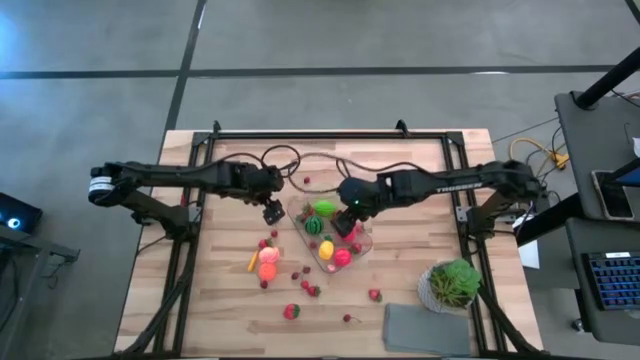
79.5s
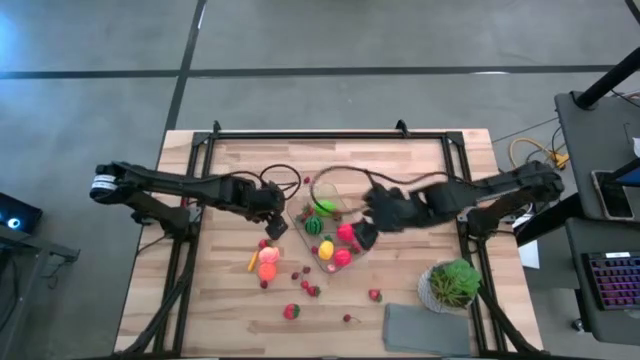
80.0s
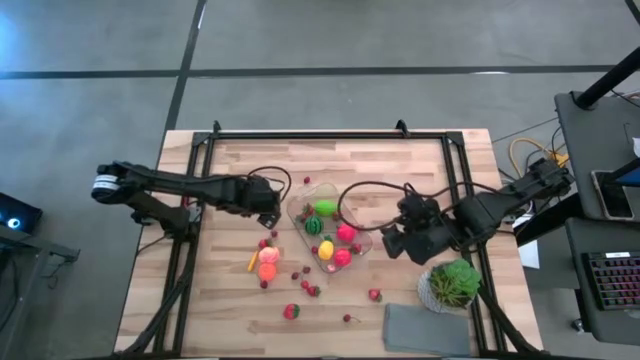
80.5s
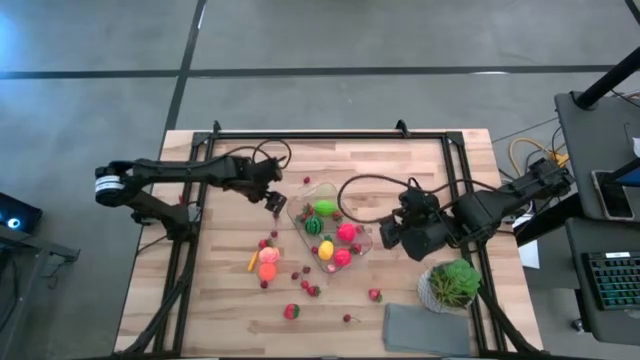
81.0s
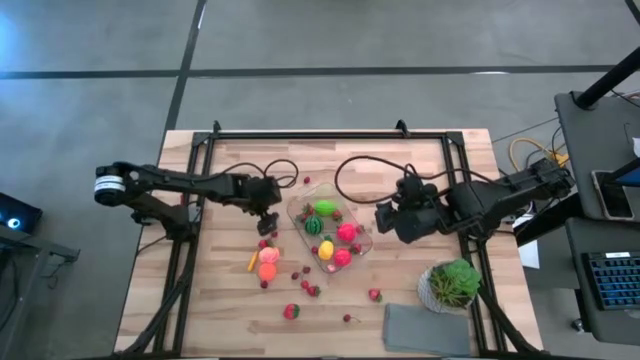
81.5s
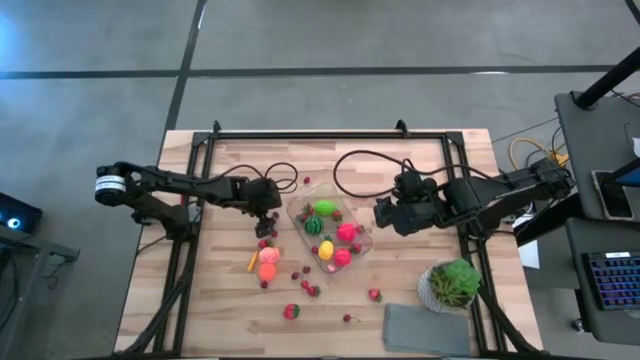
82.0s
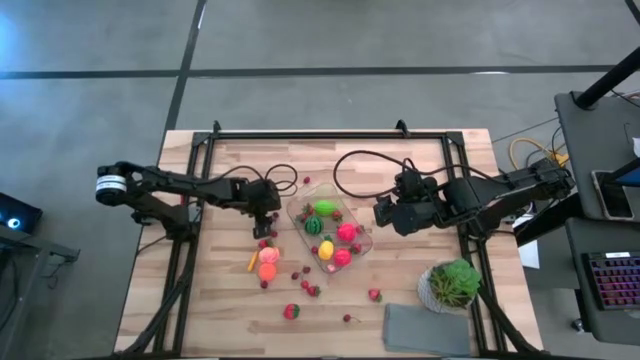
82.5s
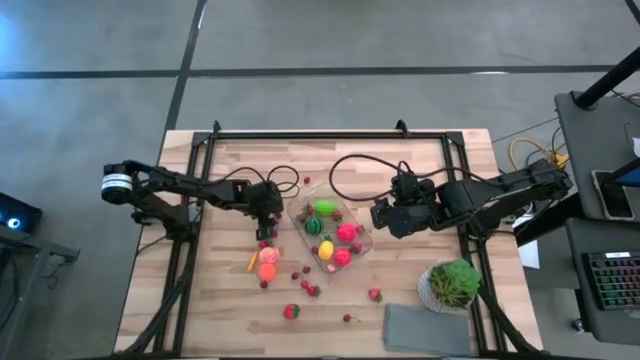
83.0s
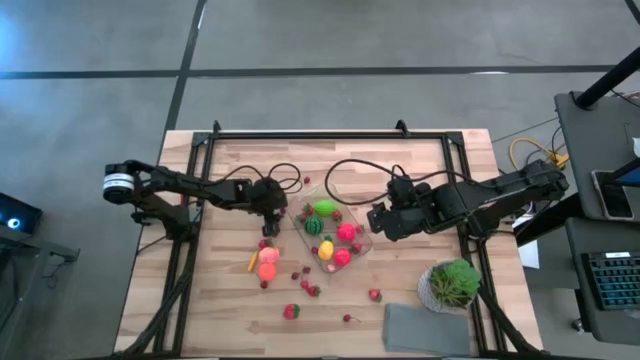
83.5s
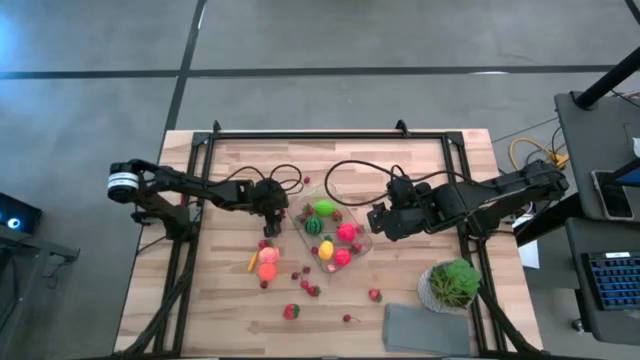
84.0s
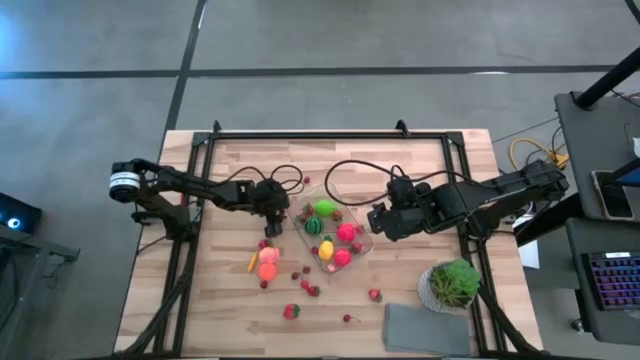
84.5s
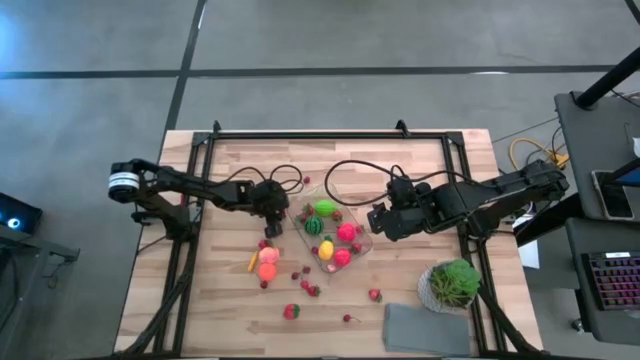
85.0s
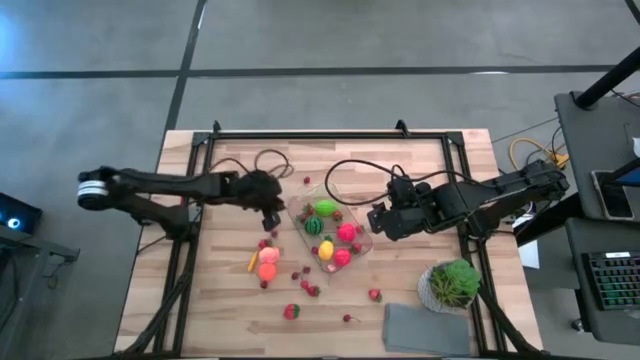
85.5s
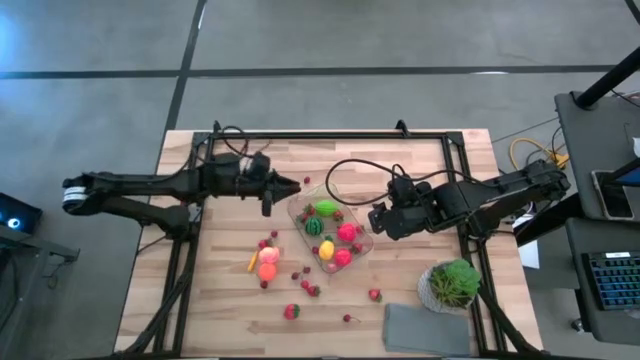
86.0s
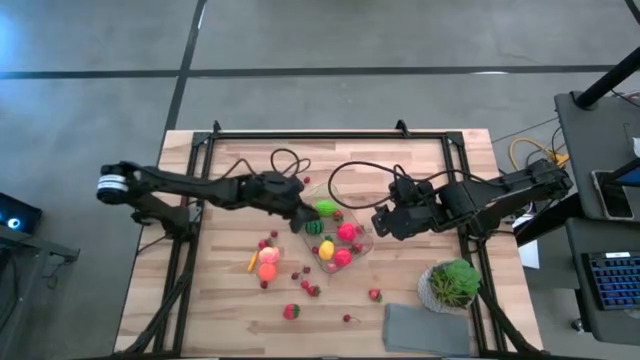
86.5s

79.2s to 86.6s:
Task: Pick and placing Produce into tupperware
Put the red cherry into the transparent bin

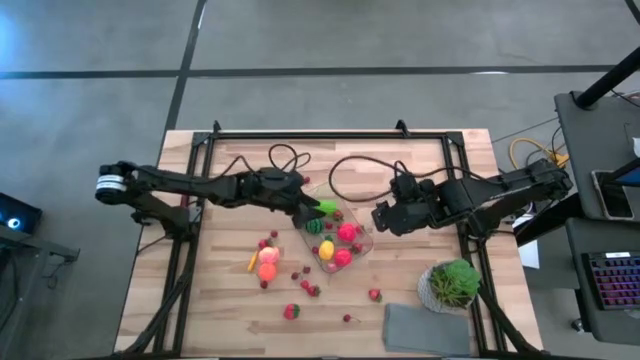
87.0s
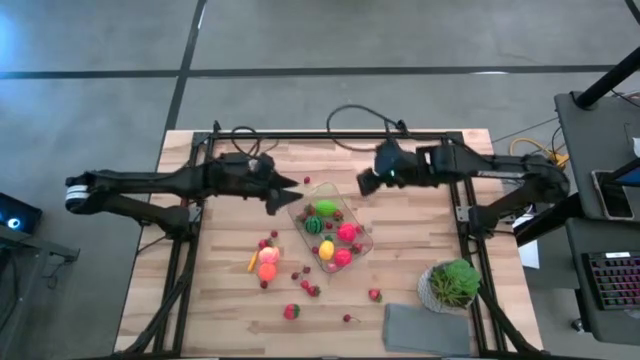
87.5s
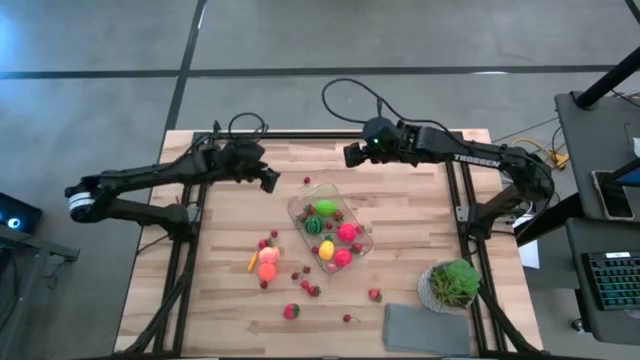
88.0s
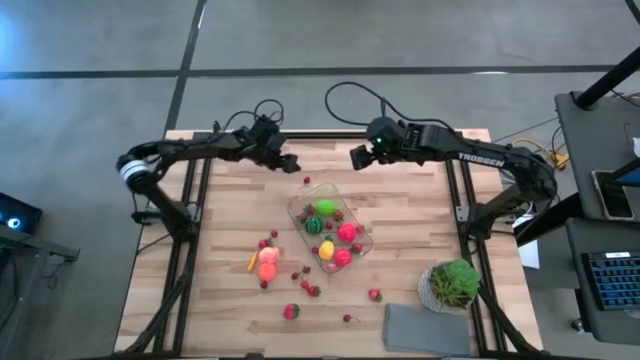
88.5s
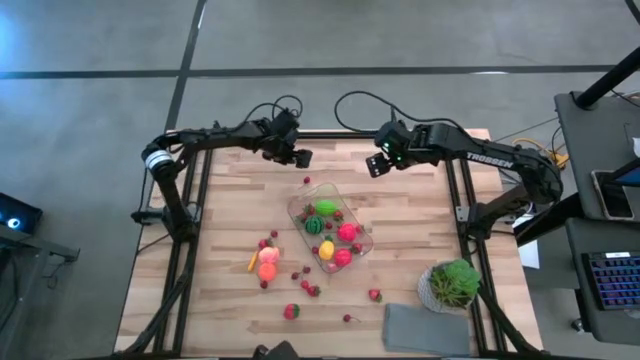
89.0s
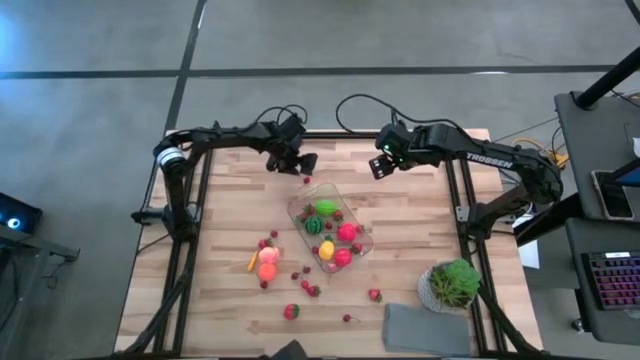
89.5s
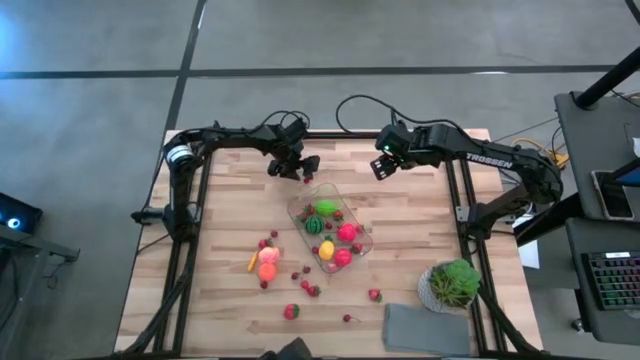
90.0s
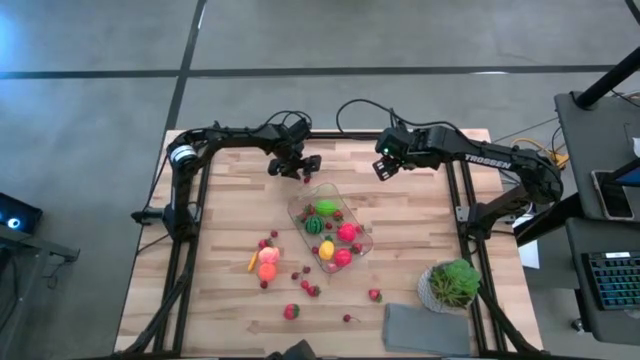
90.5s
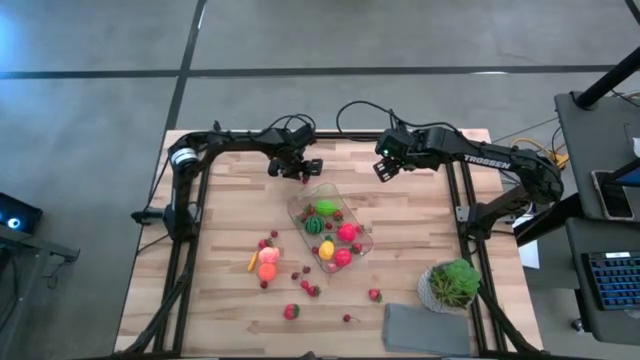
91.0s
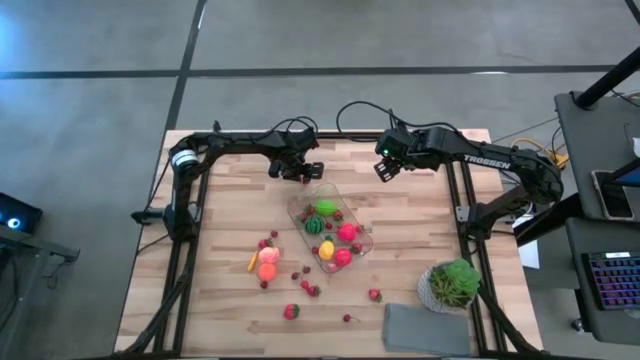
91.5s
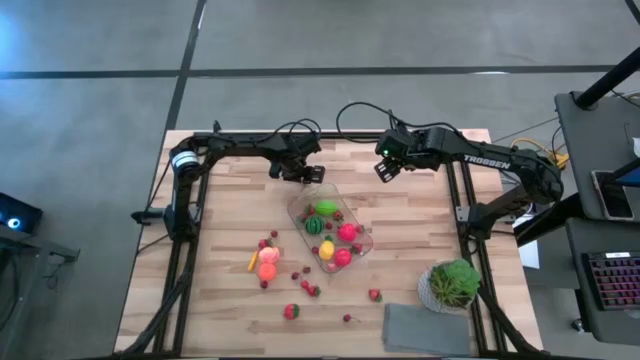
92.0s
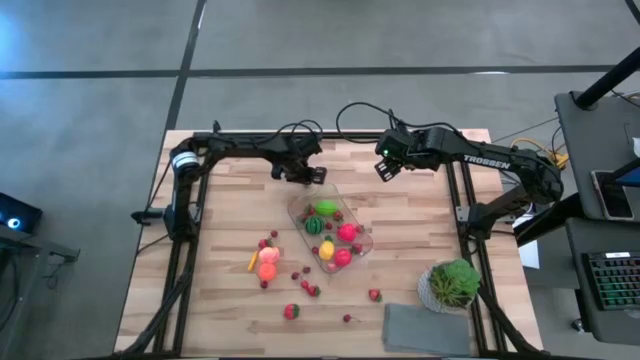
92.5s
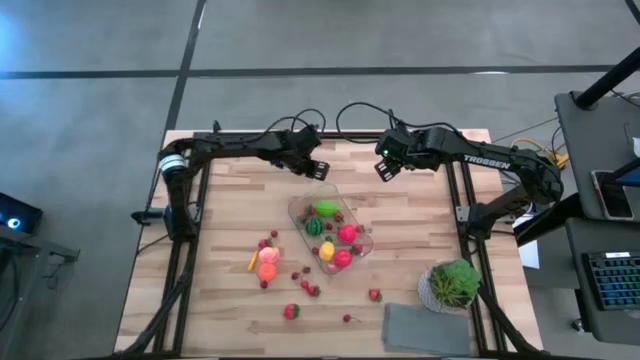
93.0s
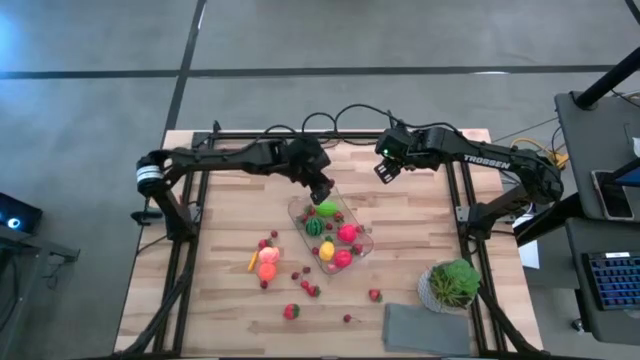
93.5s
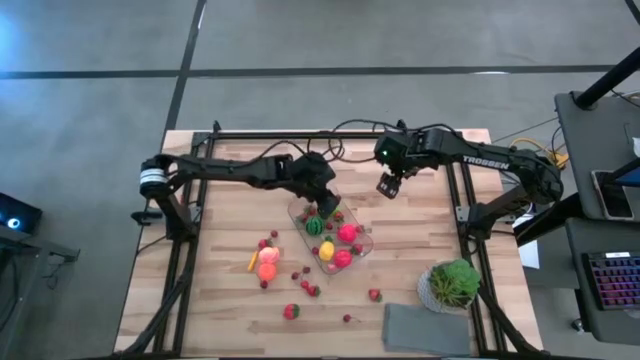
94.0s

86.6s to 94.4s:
Put the red cherry into the transparent bin

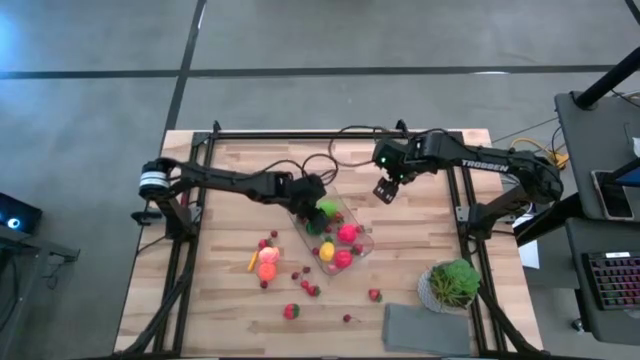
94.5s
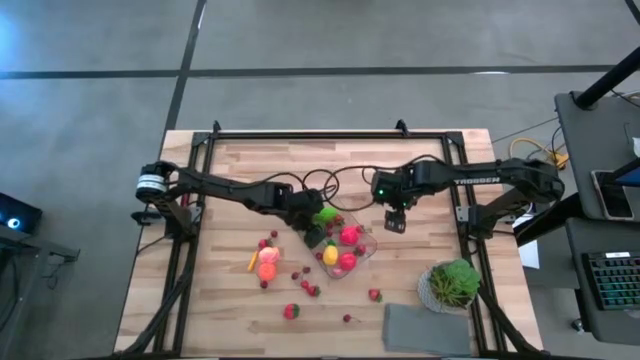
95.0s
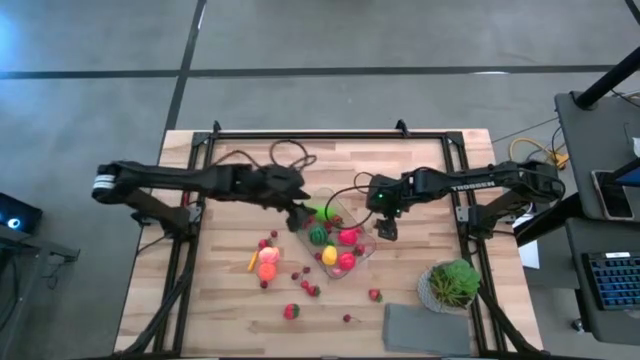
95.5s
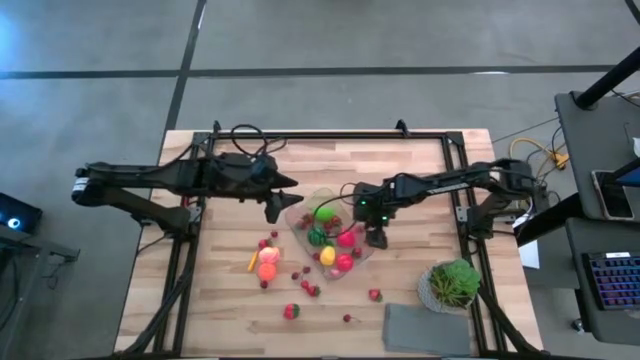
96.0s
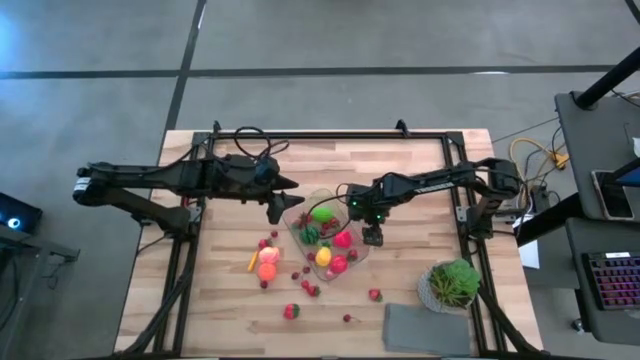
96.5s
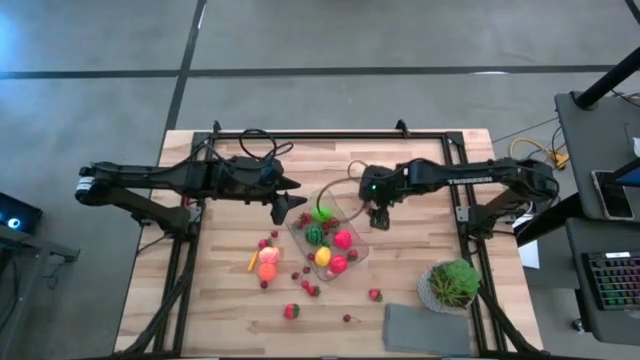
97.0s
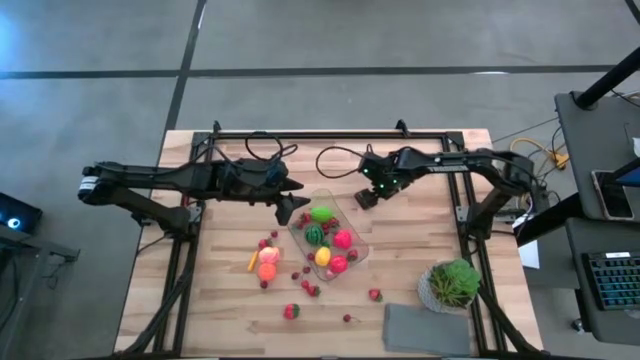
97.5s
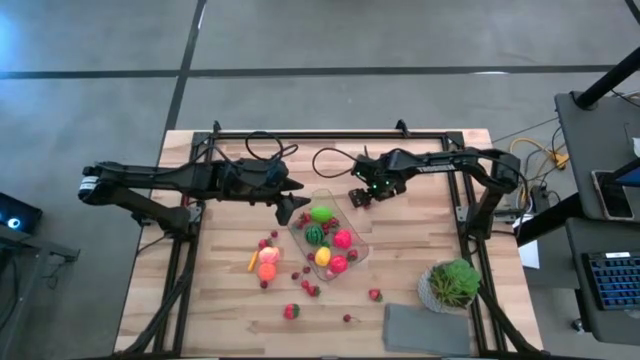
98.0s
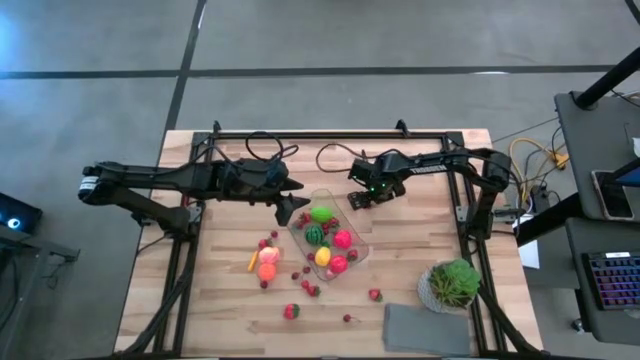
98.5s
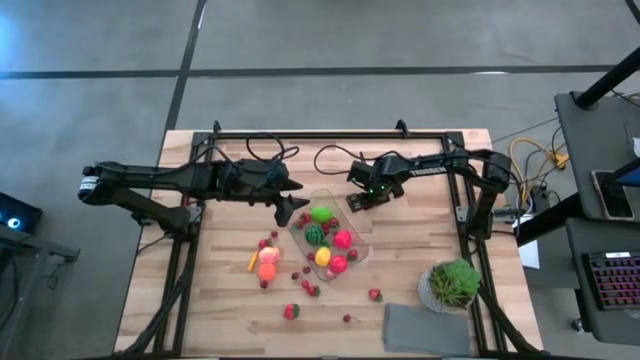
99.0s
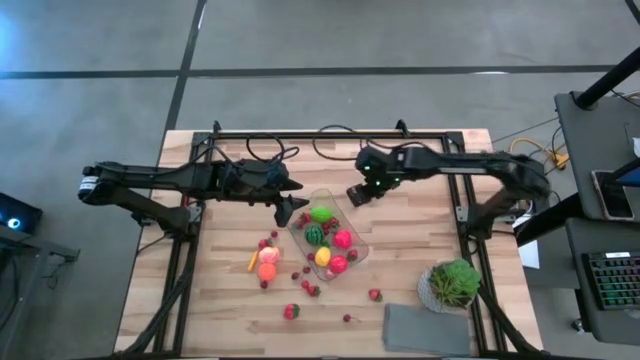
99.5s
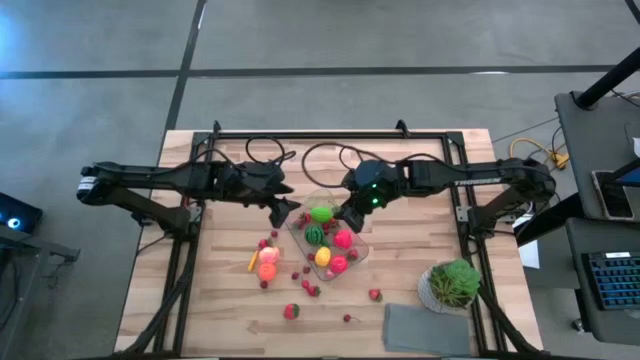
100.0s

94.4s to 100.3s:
Put the red strawberry into the transparent bin

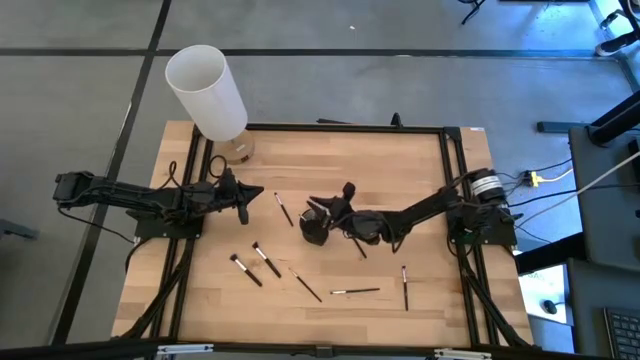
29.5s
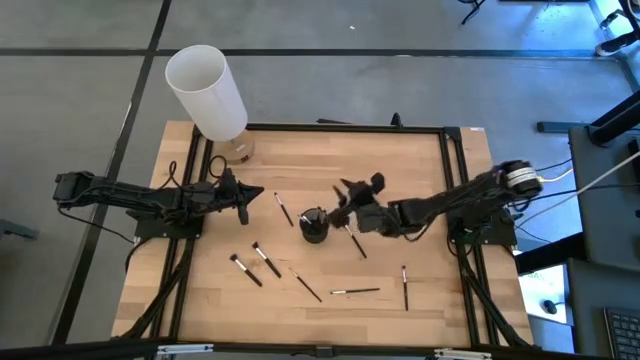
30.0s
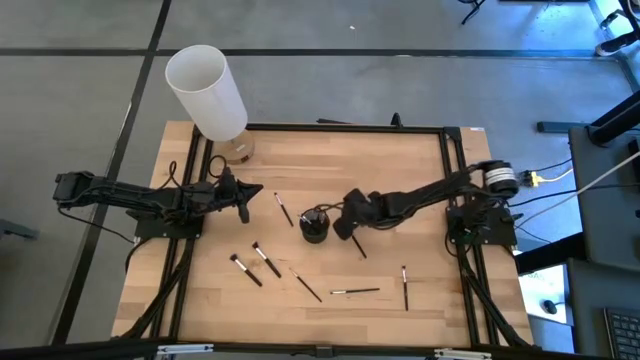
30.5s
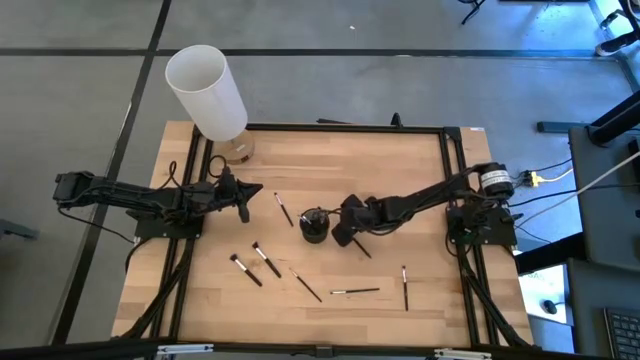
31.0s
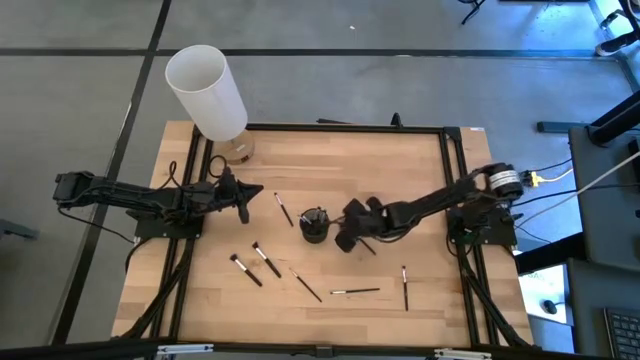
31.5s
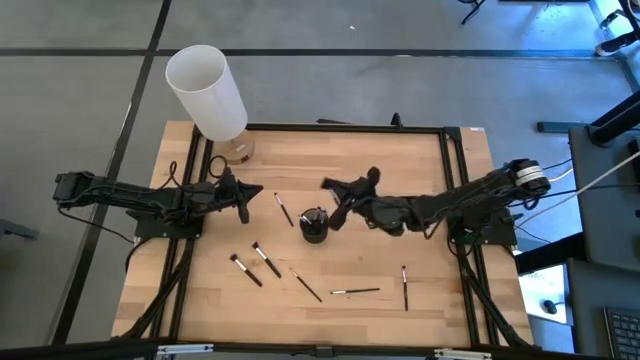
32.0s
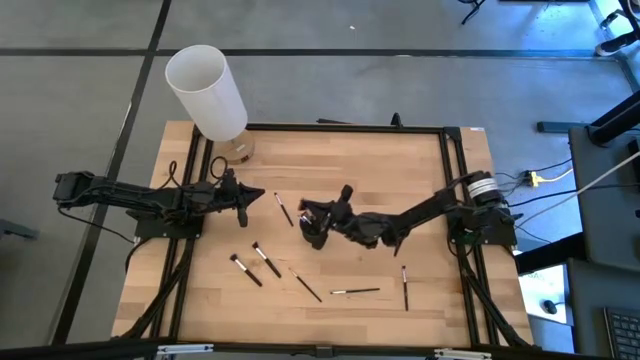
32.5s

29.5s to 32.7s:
Task: Sort items
Put the silver highlighter brush into the pen holder
